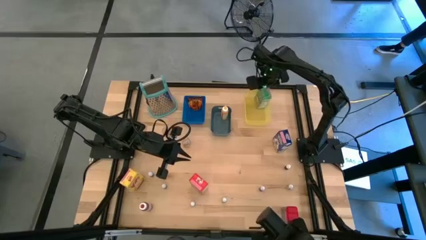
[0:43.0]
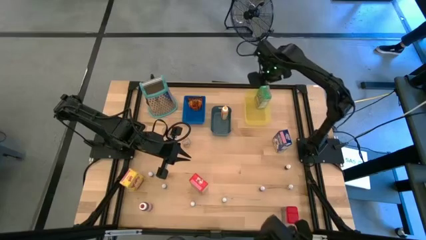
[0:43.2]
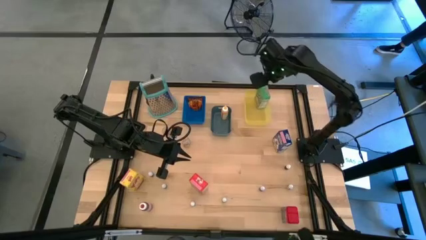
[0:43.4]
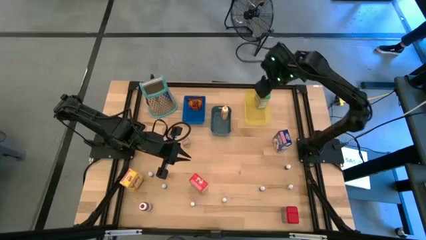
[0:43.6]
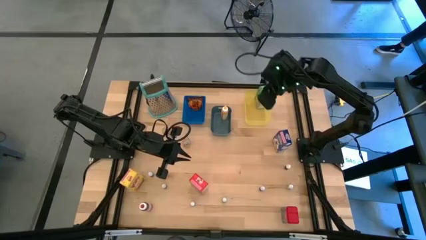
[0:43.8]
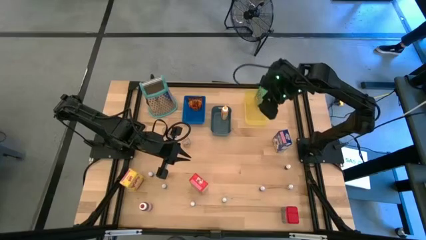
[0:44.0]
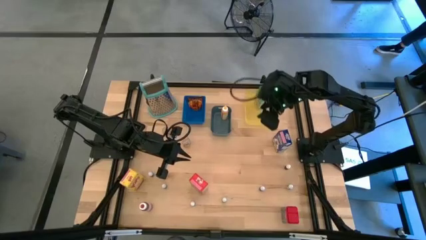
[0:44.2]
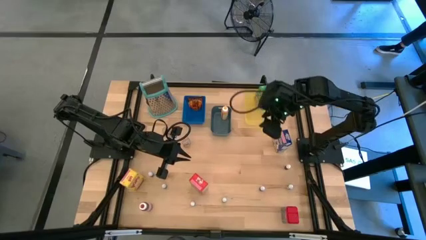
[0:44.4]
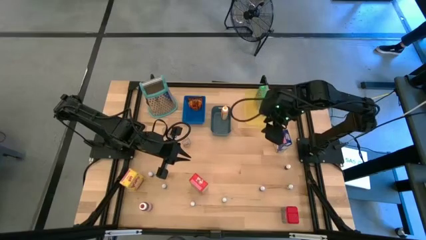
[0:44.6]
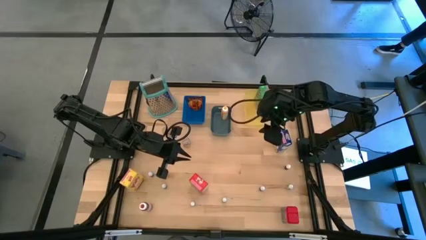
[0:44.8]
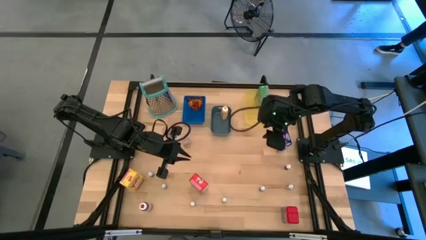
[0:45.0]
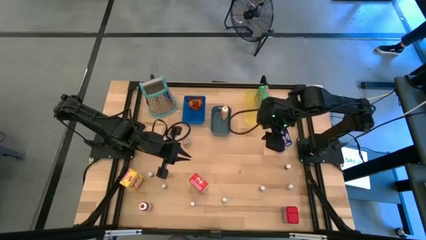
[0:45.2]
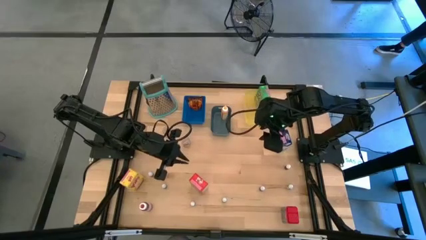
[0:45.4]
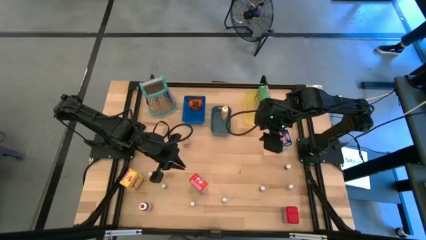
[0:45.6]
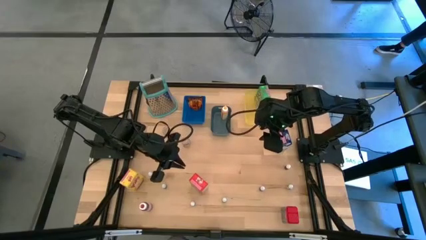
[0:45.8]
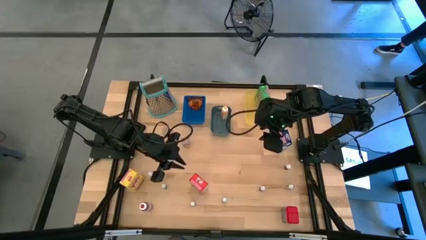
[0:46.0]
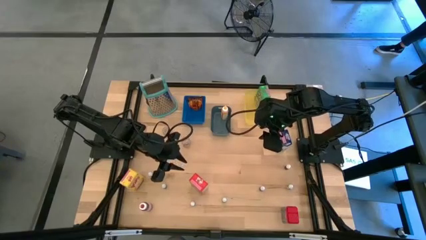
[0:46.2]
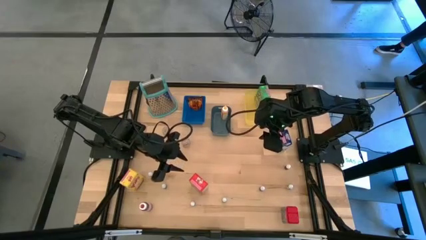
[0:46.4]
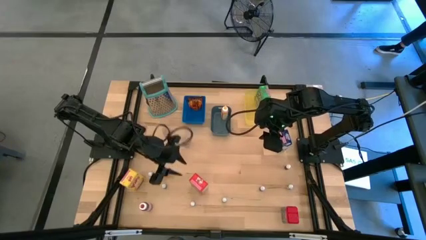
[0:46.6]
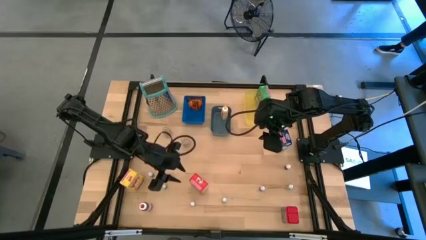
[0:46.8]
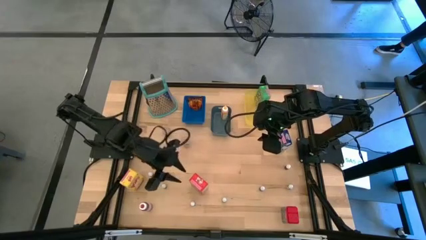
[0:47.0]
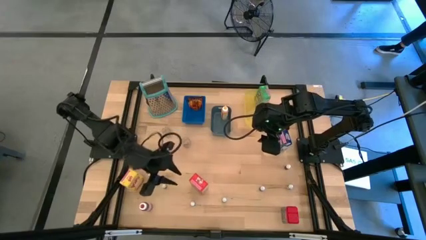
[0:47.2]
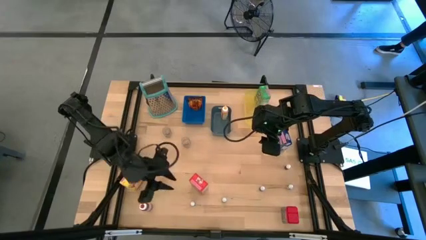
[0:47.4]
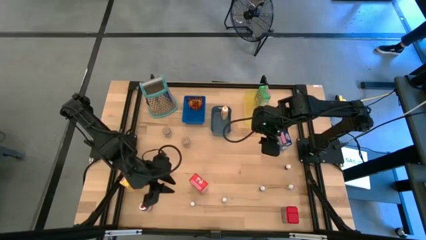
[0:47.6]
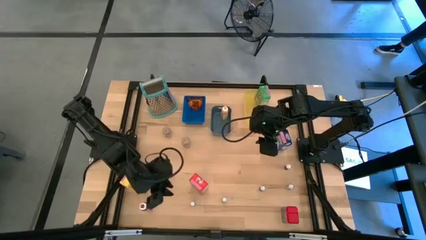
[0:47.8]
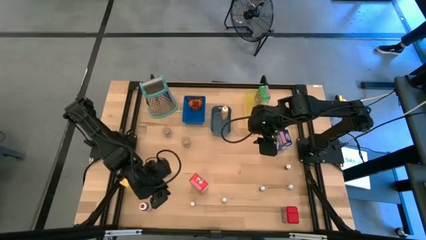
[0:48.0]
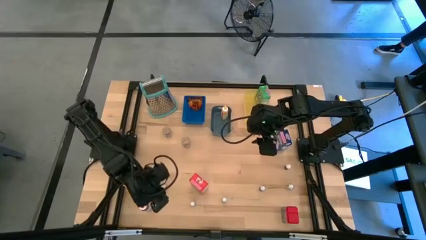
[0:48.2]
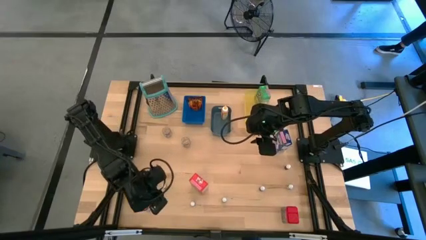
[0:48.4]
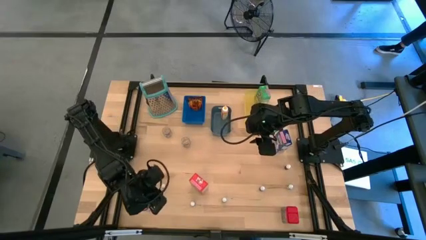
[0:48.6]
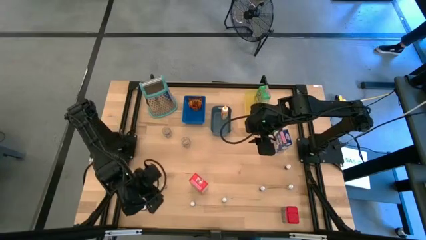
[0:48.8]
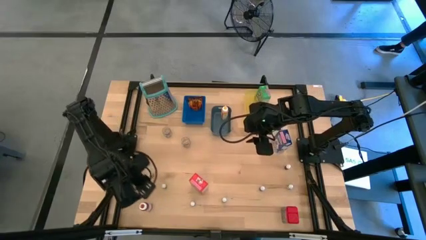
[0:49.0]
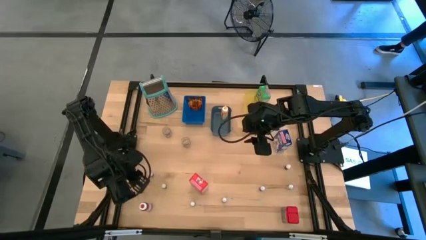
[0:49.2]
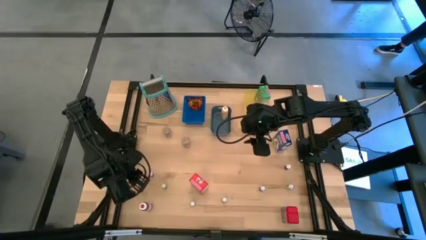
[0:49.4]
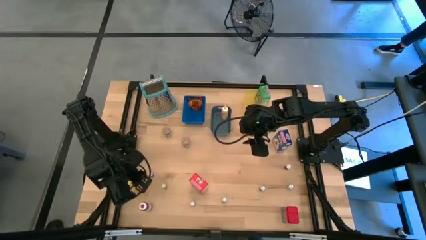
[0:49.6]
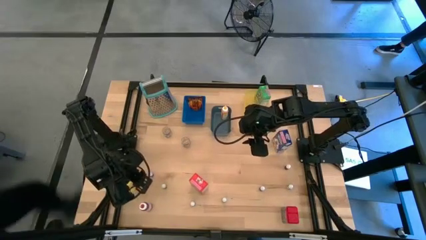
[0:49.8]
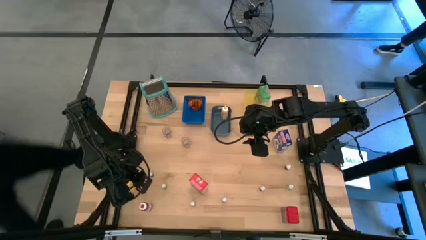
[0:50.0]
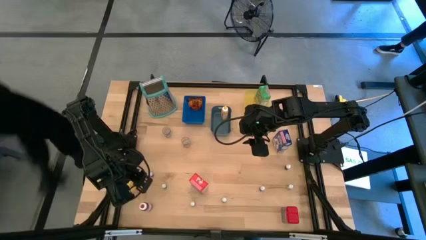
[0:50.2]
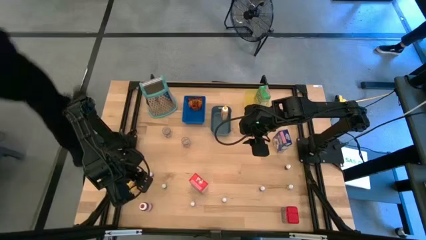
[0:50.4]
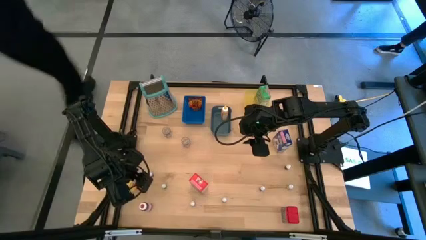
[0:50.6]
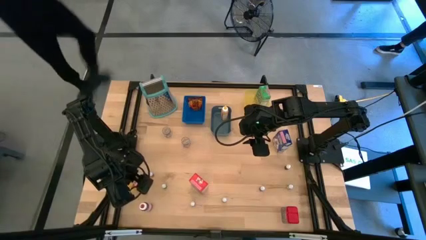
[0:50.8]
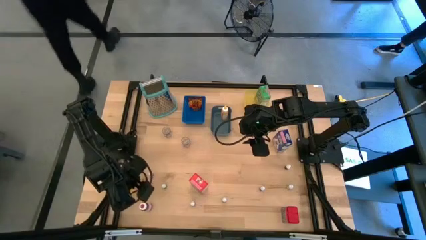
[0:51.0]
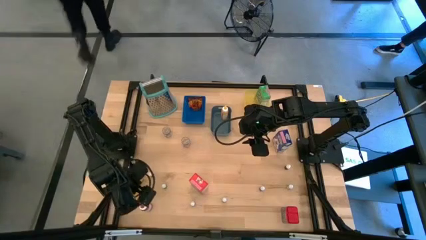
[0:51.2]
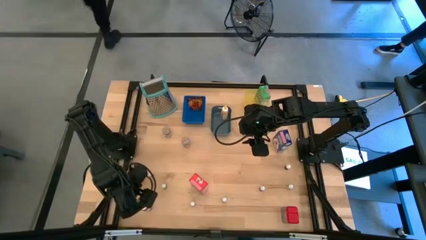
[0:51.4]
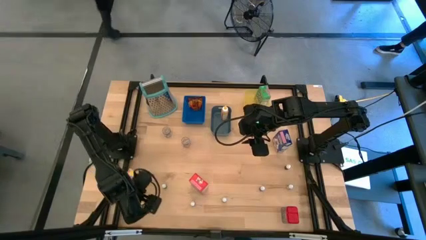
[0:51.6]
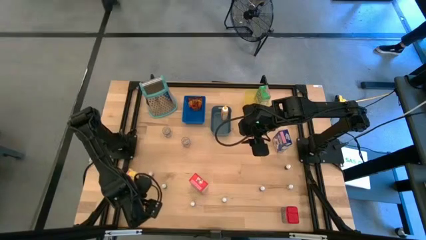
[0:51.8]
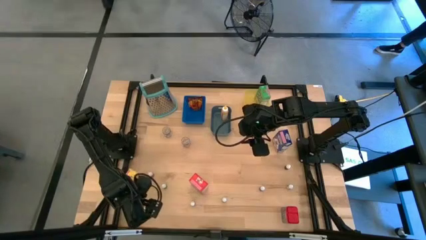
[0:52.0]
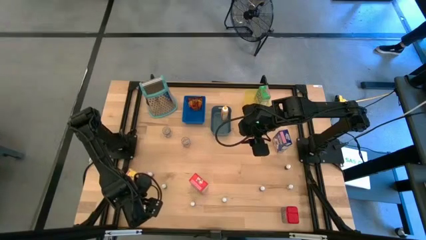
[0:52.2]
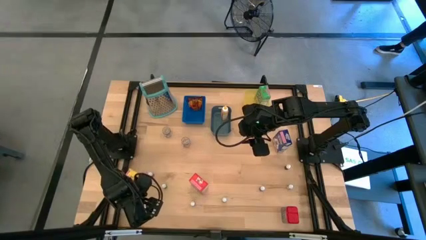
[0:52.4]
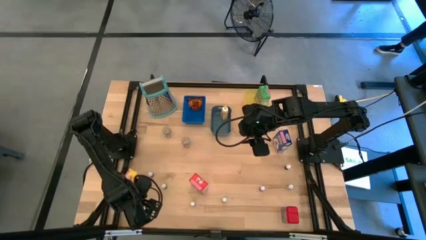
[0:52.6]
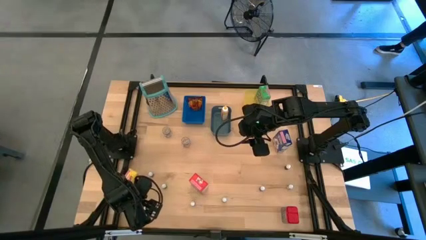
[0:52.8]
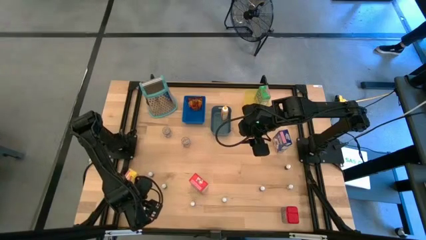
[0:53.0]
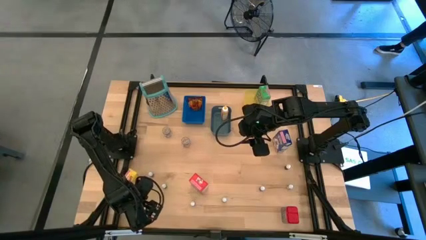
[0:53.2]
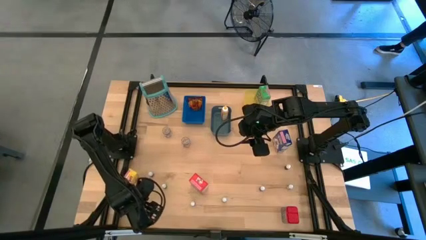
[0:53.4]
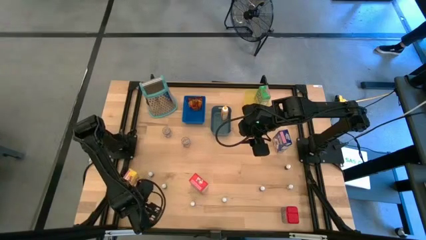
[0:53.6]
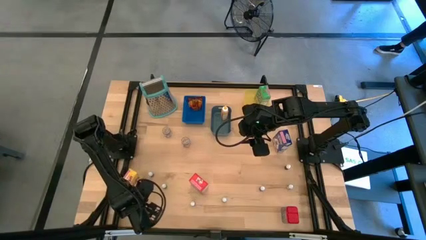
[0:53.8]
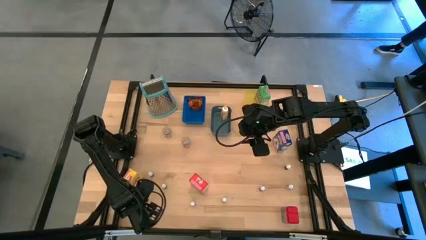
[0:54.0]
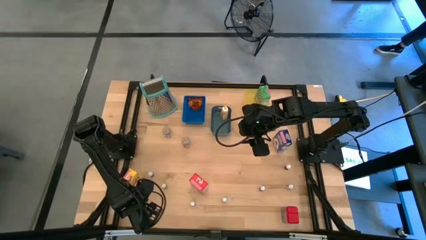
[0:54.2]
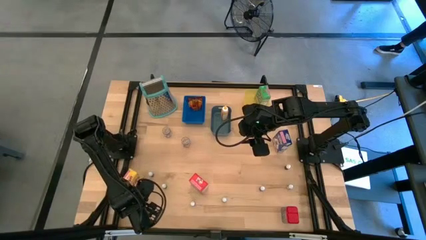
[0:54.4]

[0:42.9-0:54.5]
Task: Pick & Place Kitchen Items
Put the big red food coloring bottle into the dark green bin

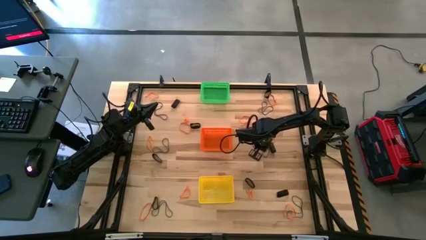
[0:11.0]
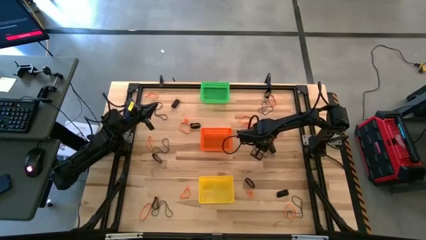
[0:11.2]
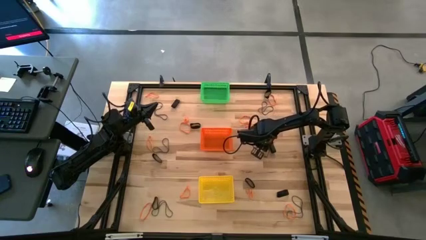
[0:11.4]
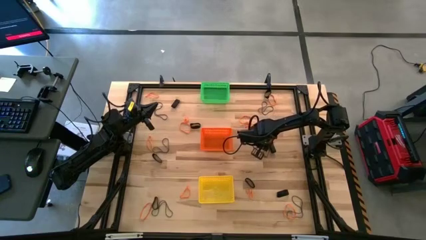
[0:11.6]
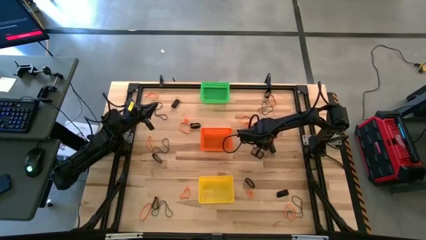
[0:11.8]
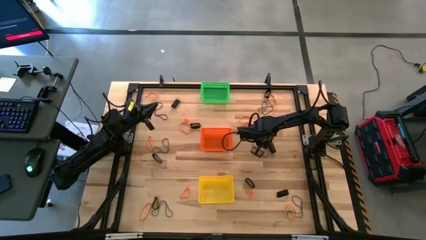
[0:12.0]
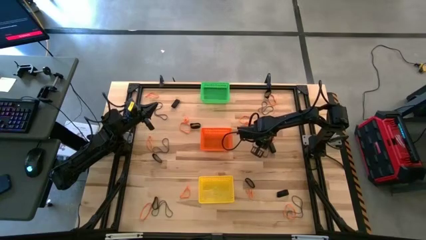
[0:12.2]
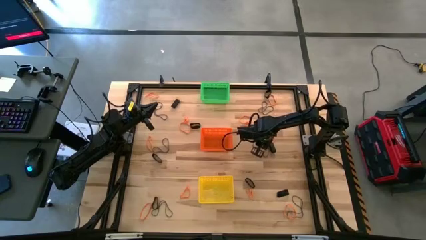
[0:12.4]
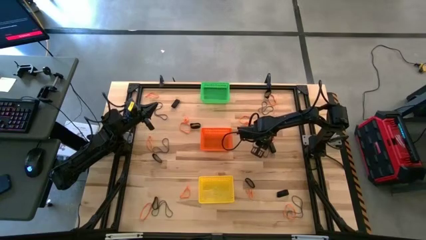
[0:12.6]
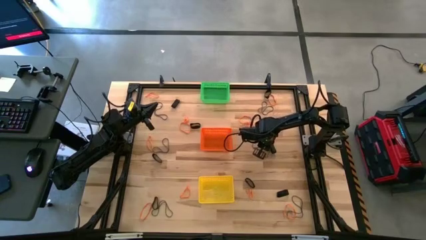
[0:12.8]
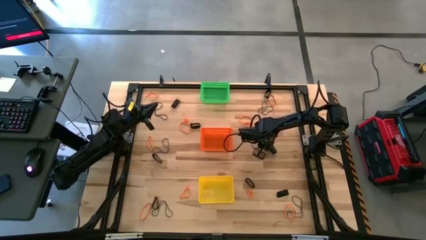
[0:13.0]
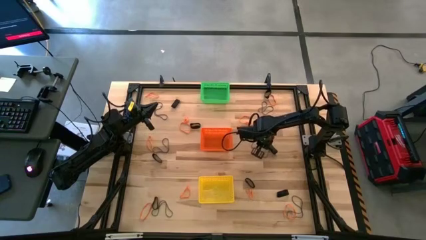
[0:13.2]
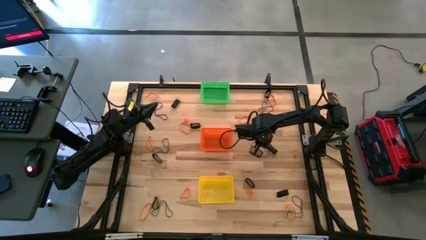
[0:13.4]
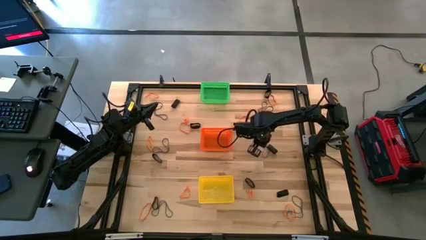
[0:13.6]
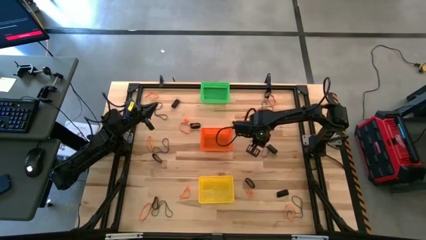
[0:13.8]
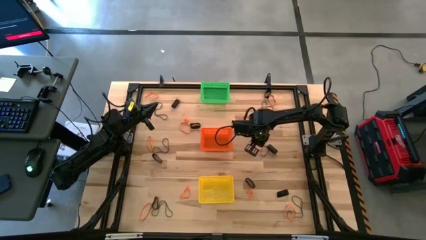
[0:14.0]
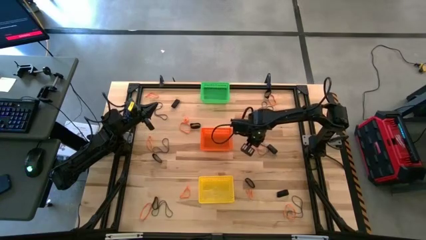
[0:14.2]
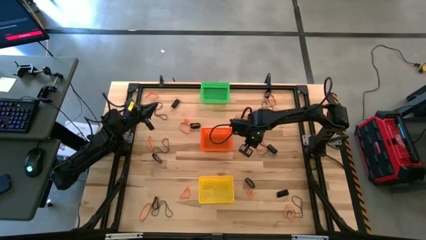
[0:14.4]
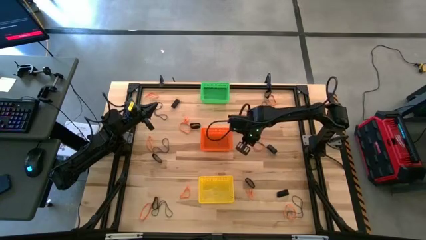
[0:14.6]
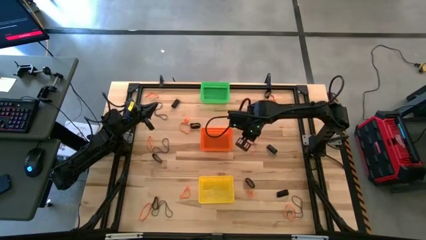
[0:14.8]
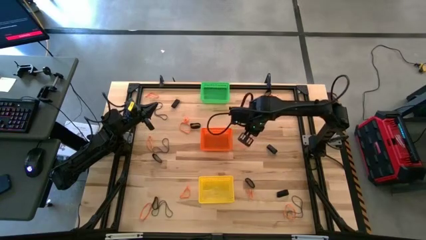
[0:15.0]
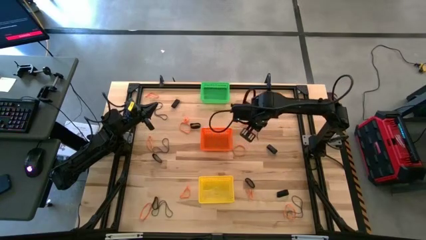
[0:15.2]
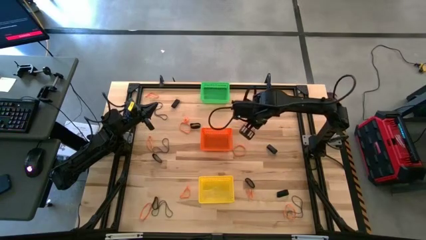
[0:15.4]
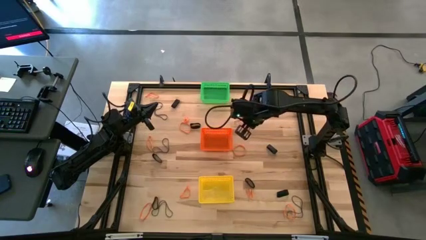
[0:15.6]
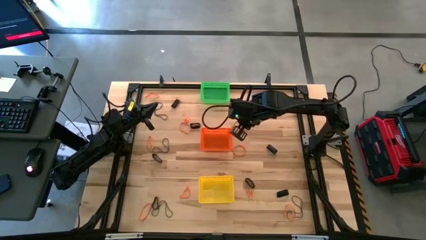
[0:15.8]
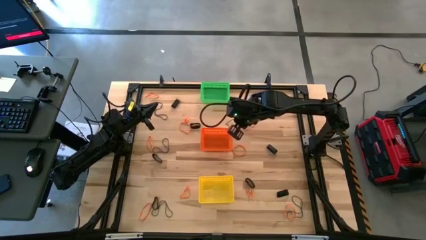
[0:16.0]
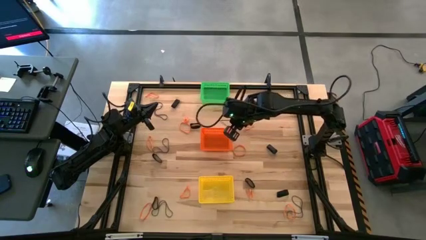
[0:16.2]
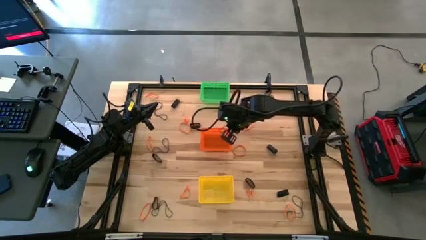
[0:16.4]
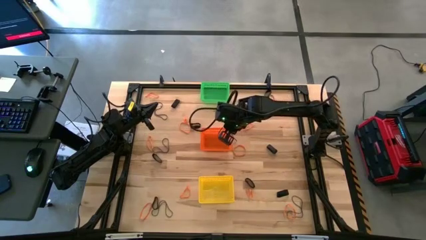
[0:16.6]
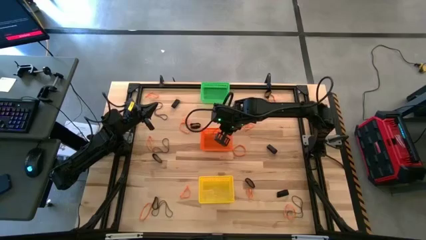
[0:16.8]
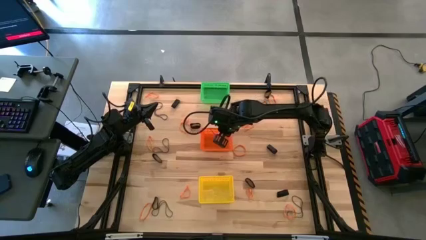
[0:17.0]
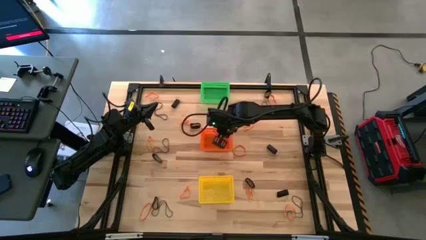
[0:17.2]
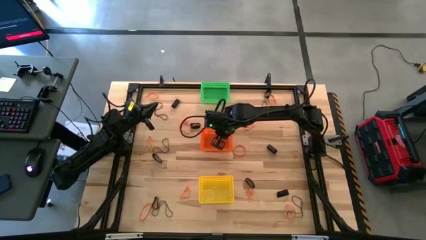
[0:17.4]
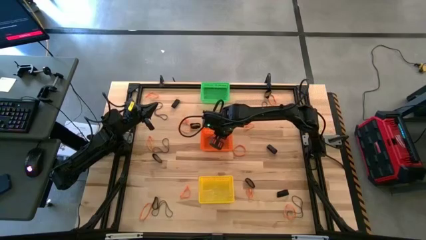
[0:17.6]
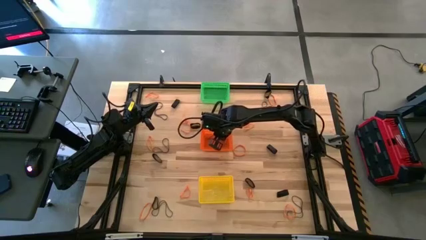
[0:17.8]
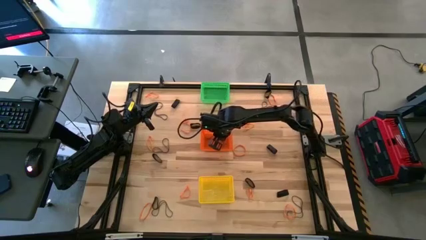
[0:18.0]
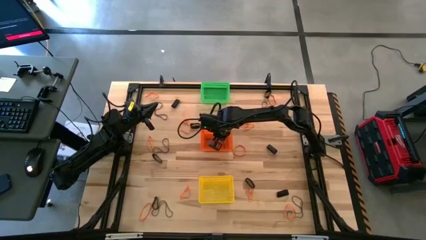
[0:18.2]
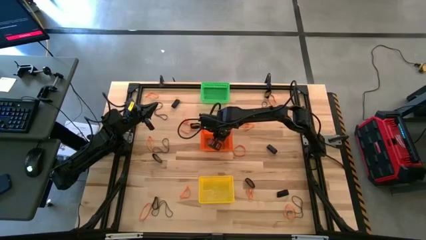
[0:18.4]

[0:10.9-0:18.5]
Task: Sort rubber bands into baskets
Put the purple rubber band into the orange bin
